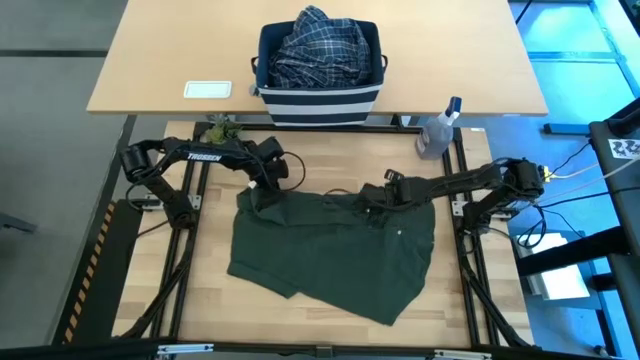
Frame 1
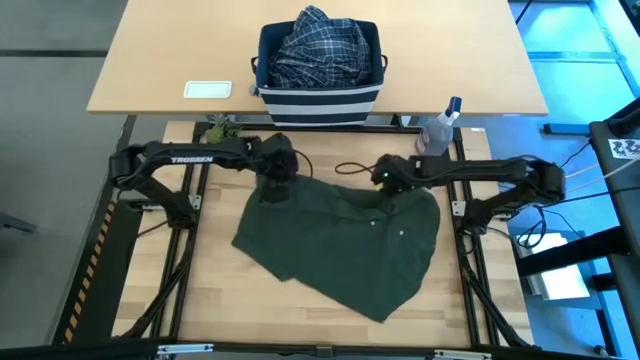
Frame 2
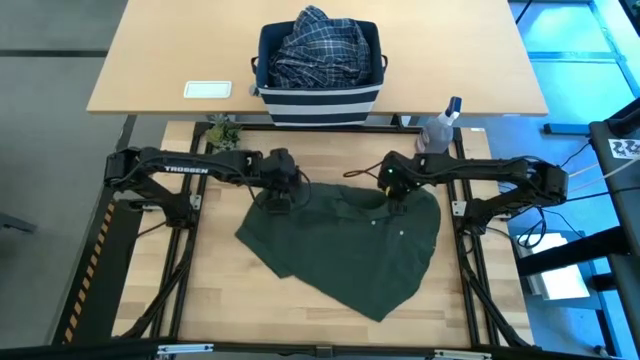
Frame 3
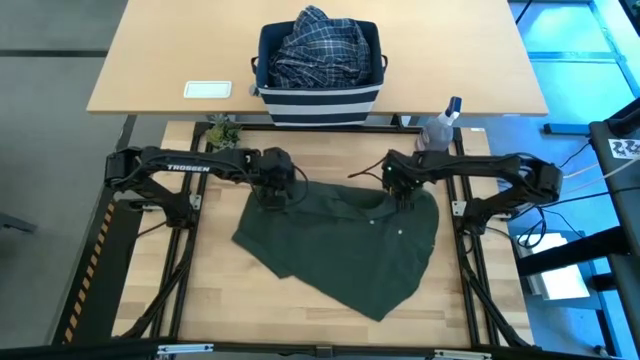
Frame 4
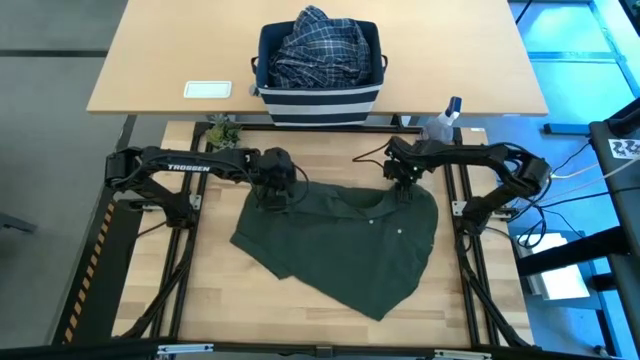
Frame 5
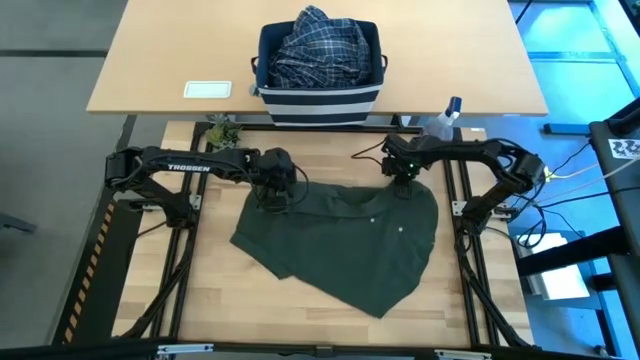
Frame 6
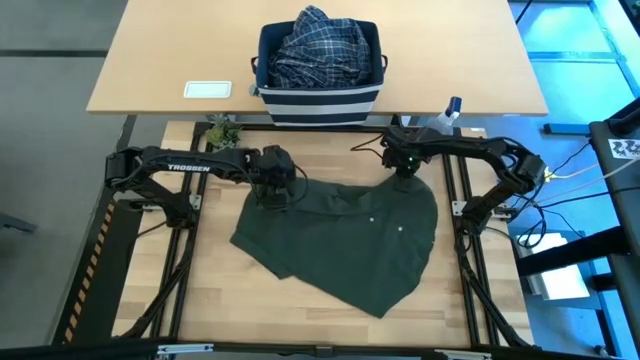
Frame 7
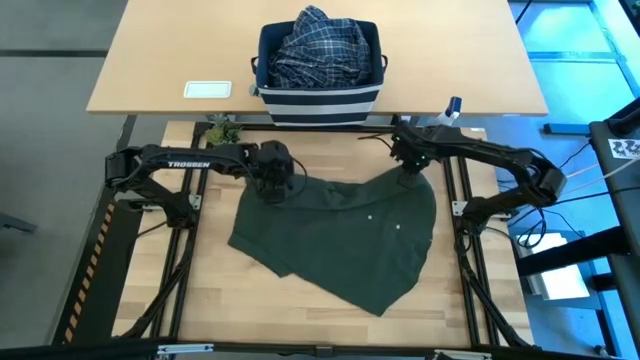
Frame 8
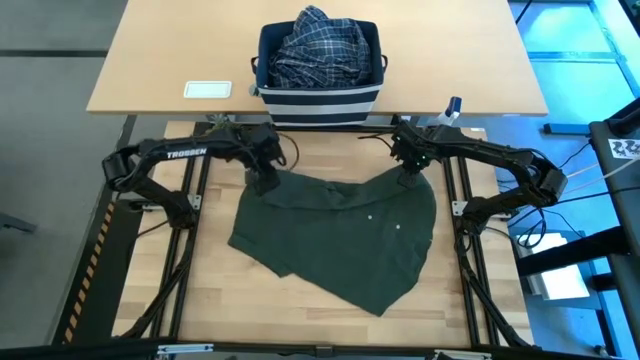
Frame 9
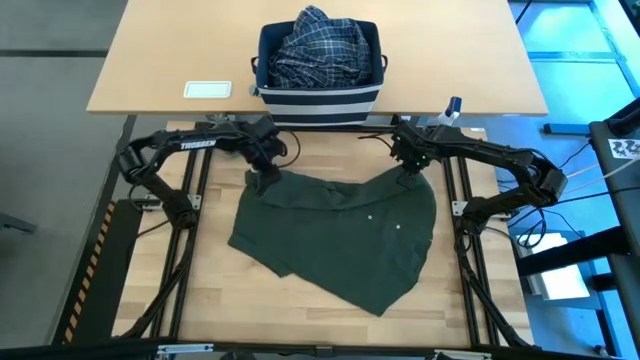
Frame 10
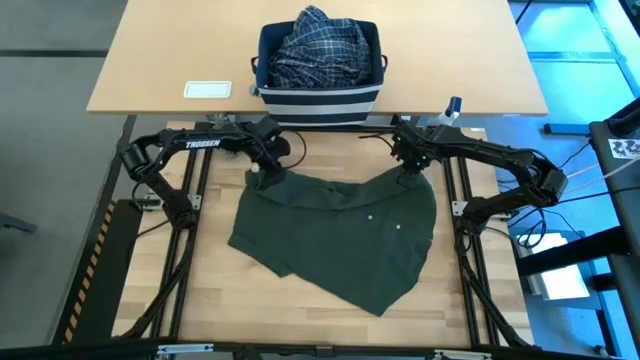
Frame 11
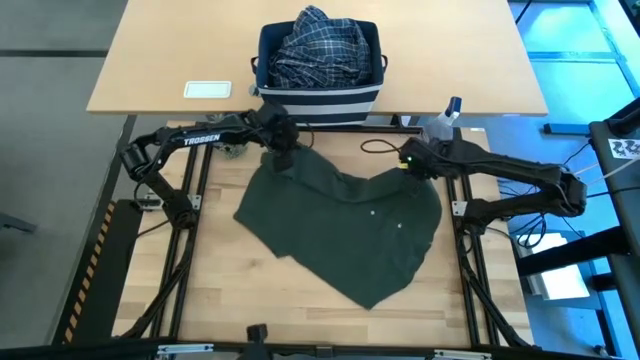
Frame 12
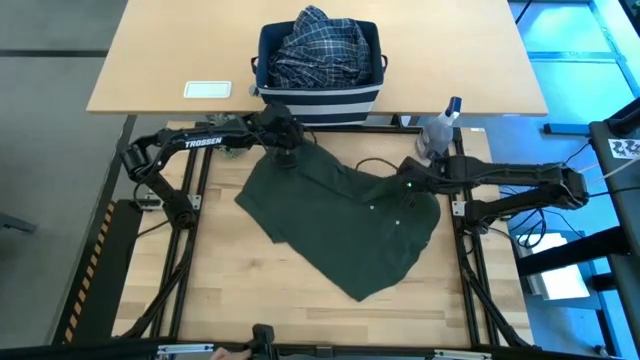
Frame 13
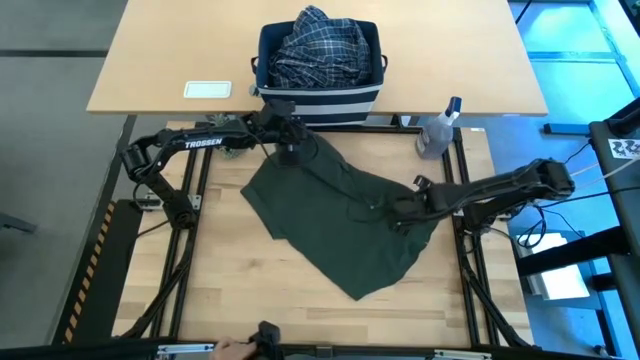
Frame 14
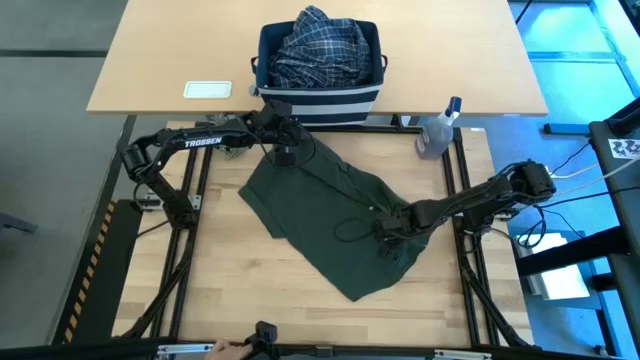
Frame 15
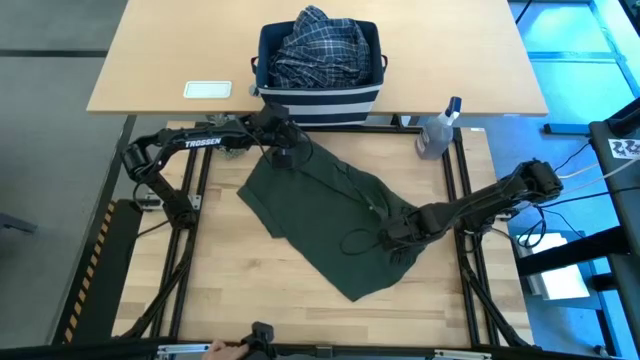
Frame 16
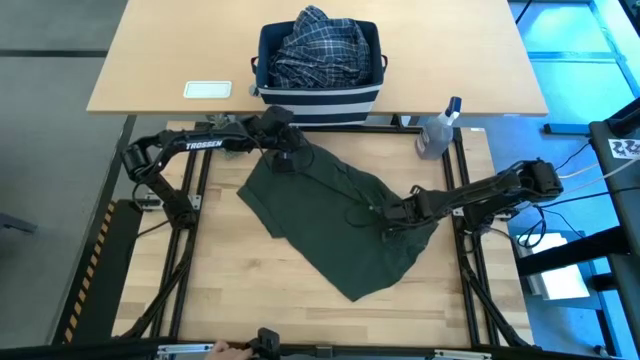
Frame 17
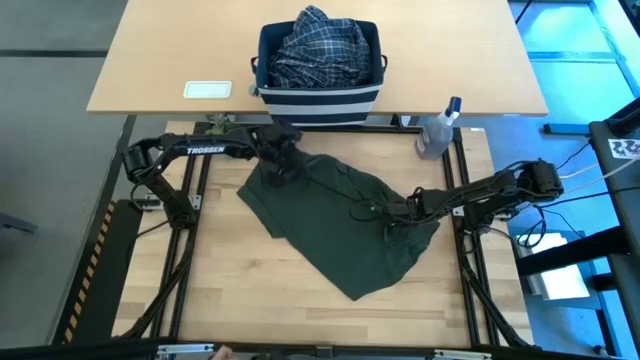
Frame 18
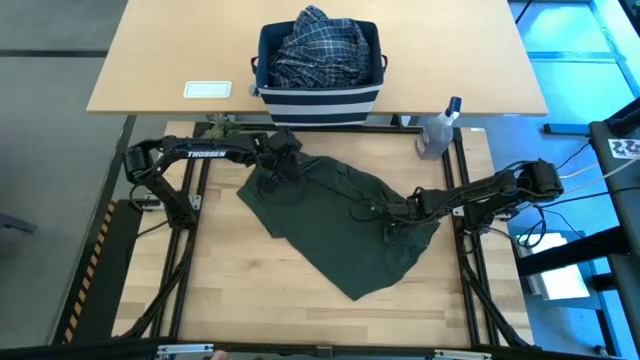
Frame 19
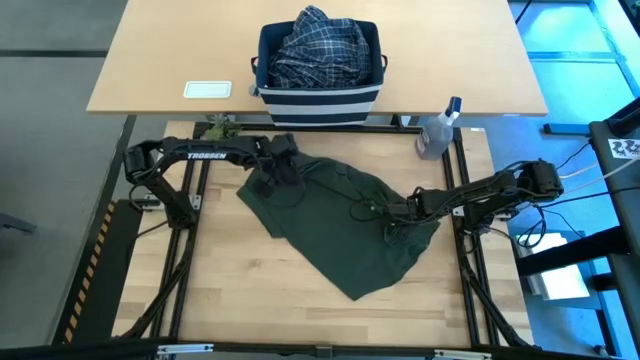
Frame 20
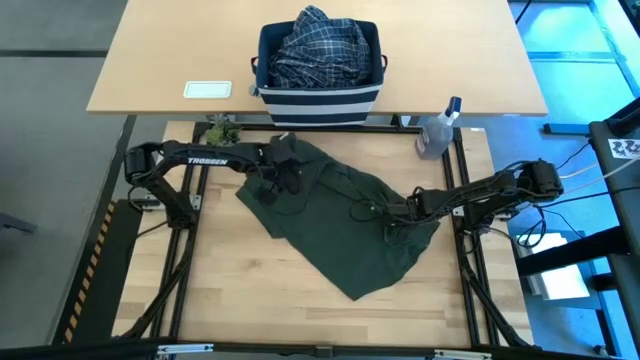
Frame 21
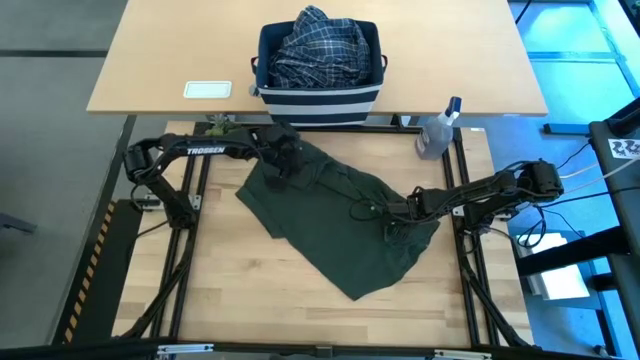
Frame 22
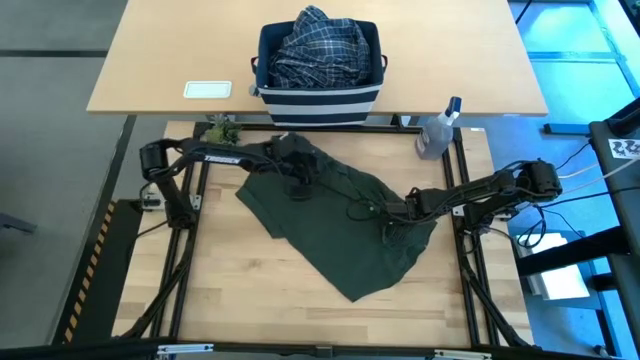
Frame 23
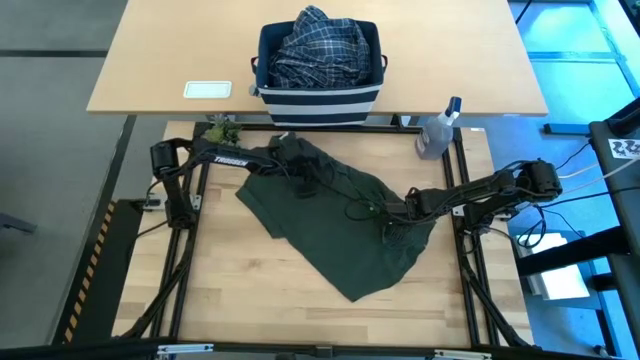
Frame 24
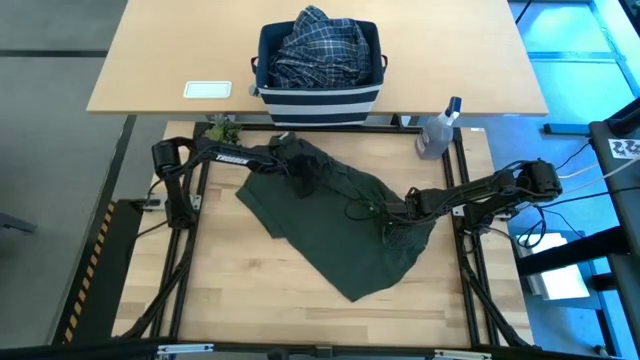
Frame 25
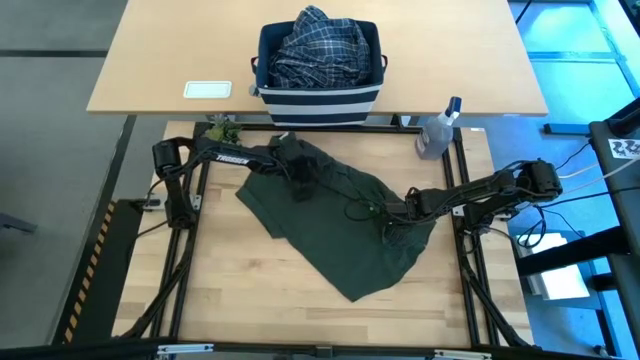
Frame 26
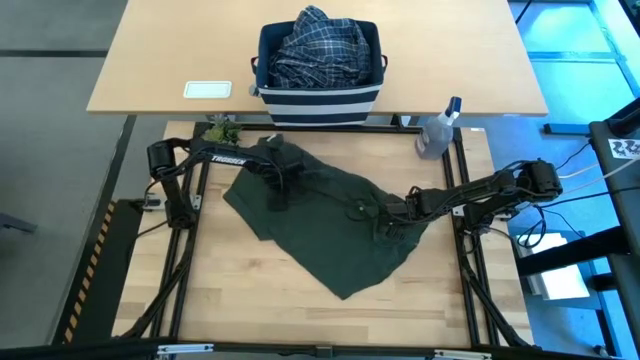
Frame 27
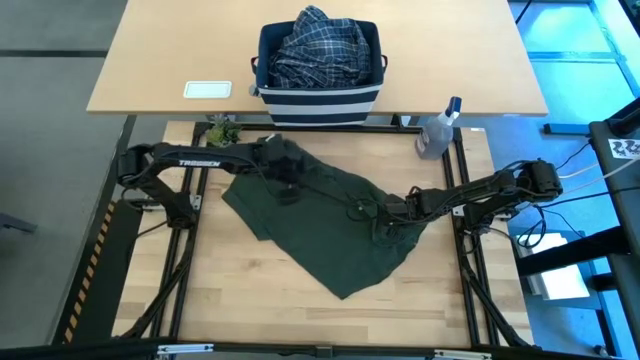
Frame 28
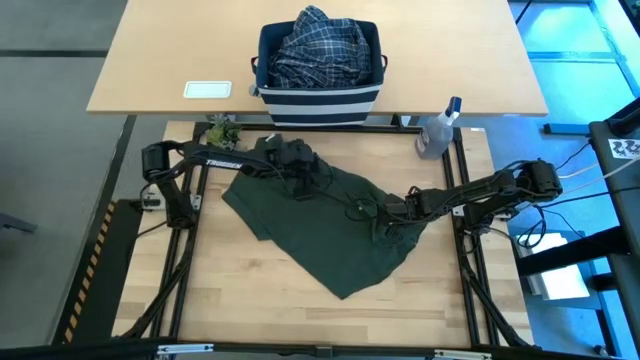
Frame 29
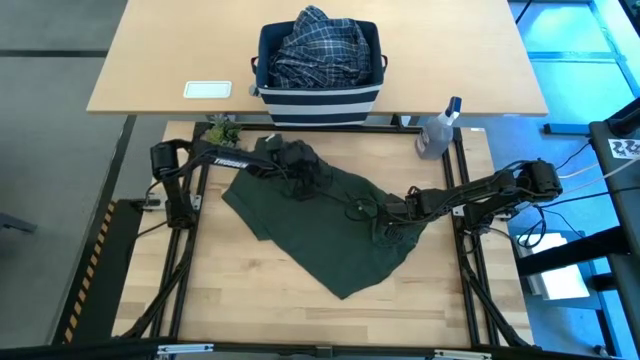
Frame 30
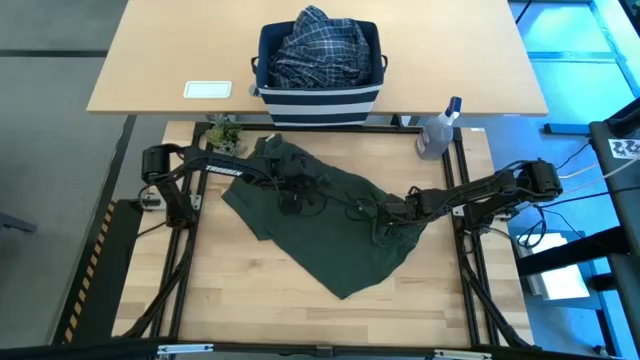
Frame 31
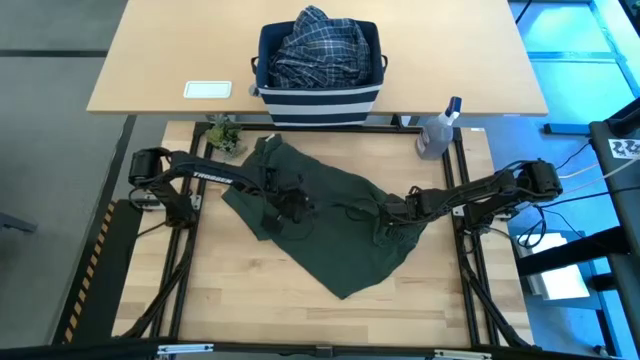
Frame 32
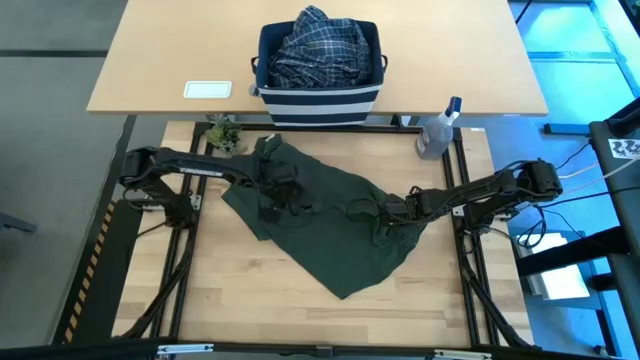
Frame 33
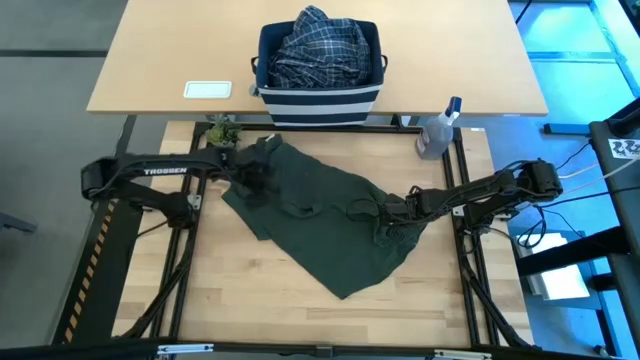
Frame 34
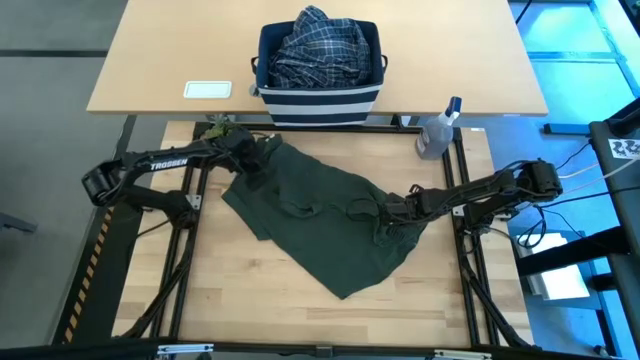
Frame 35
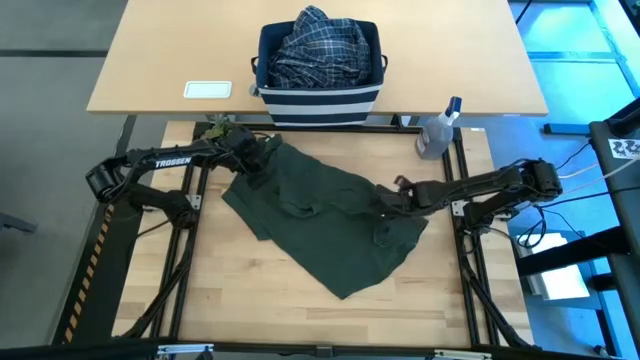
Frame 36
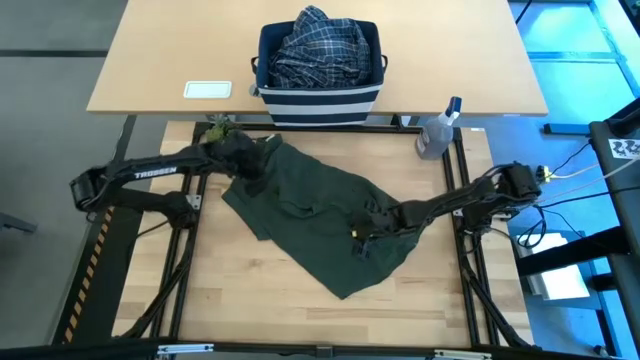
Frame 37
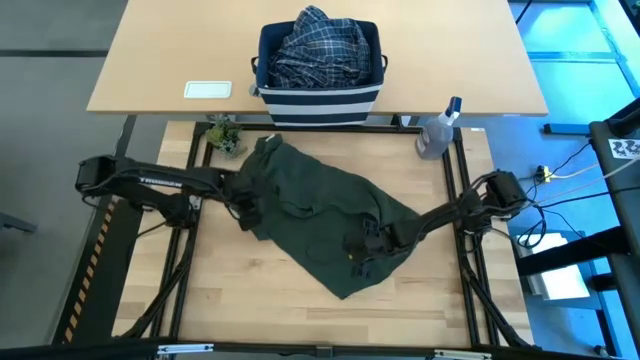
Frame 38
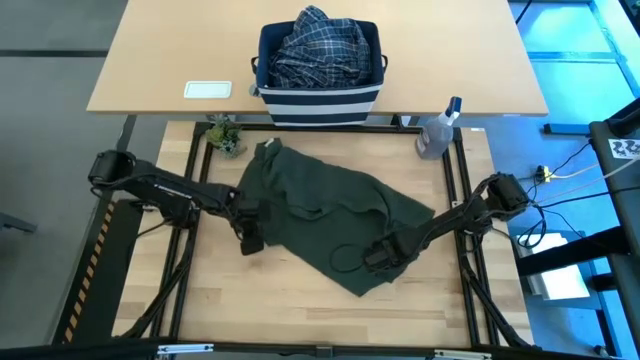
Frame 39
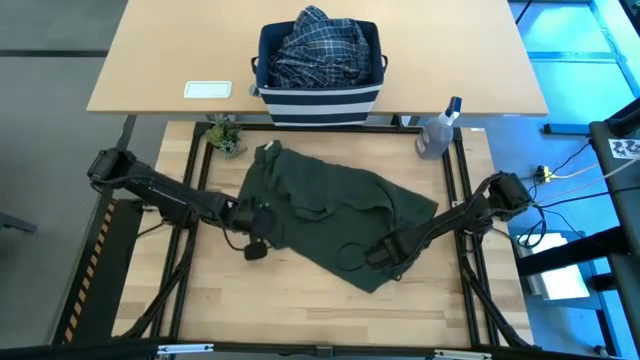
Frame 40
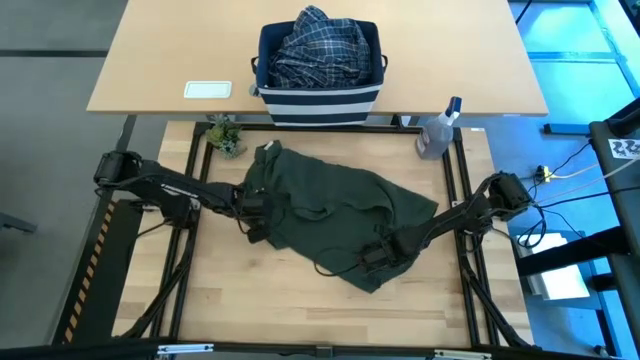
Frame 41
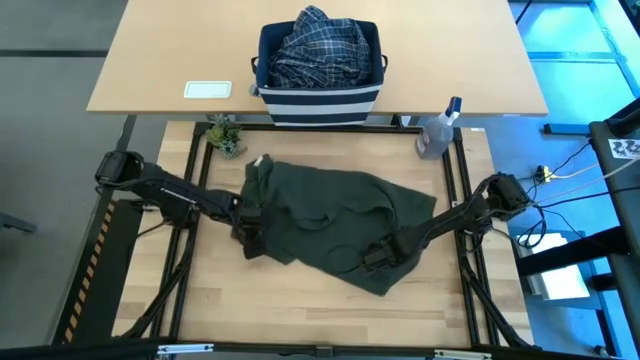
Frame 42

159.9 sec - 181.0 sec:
Task: Fold Laundry from Bin
Fold the green polo shirt
